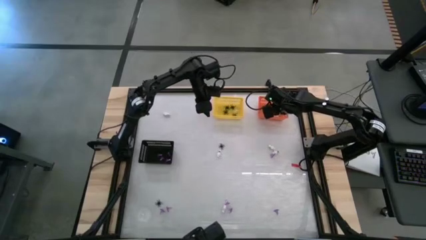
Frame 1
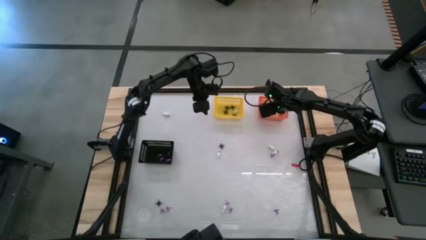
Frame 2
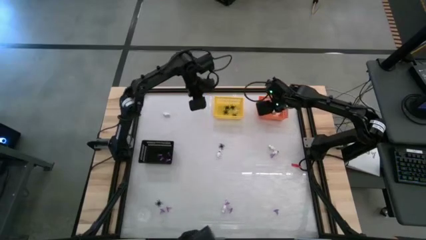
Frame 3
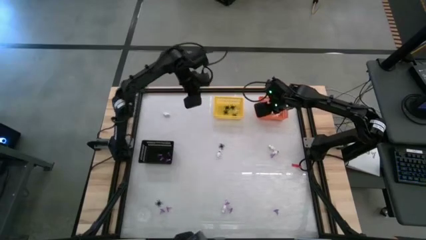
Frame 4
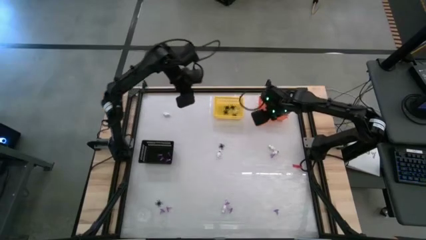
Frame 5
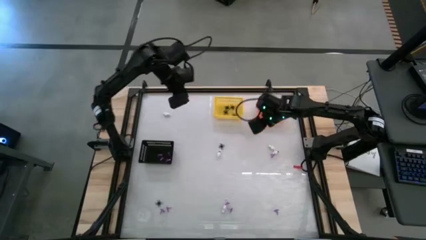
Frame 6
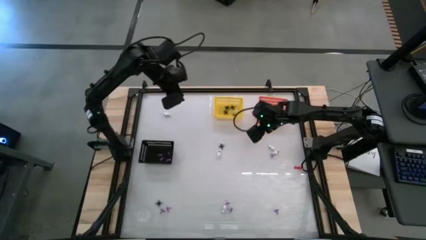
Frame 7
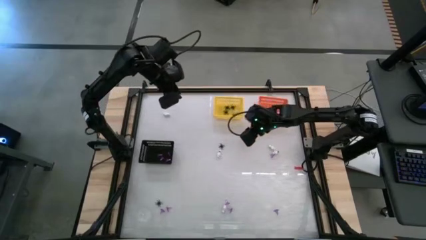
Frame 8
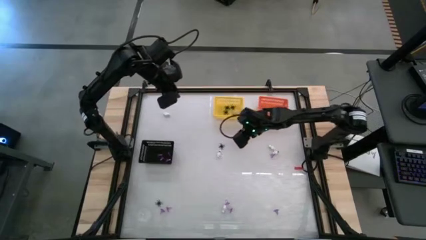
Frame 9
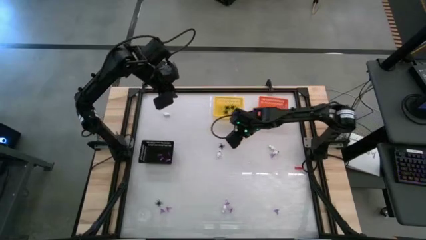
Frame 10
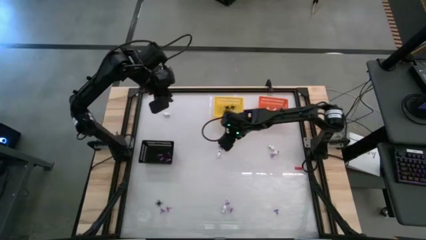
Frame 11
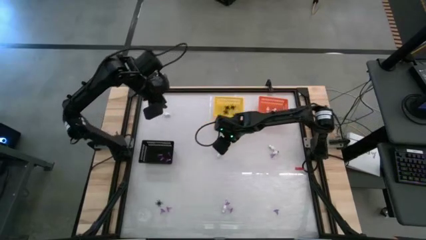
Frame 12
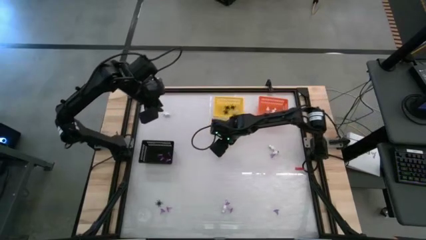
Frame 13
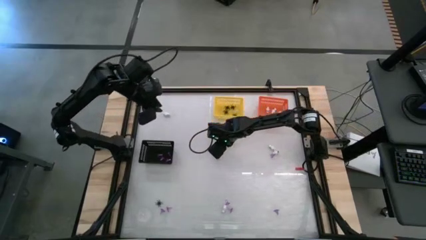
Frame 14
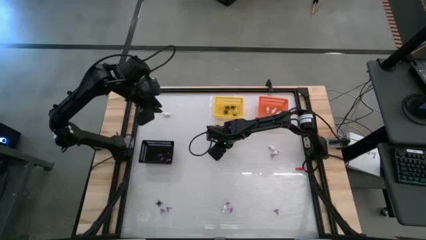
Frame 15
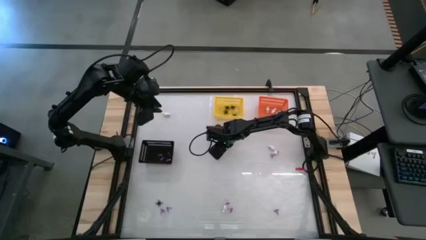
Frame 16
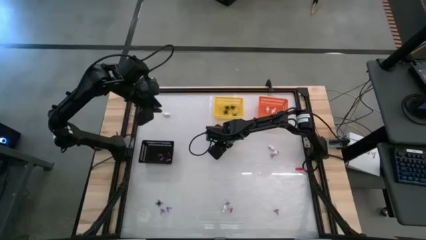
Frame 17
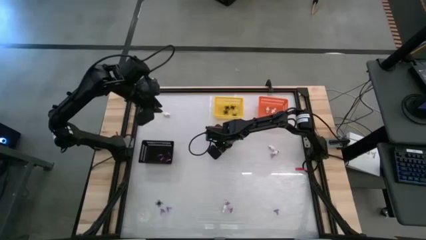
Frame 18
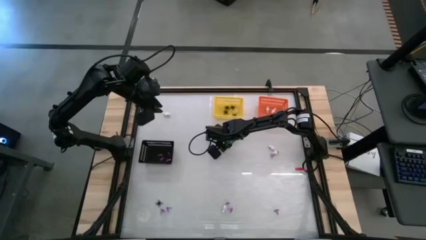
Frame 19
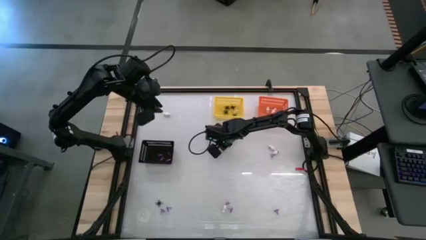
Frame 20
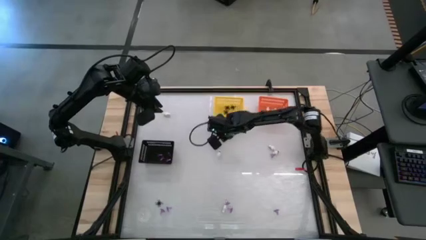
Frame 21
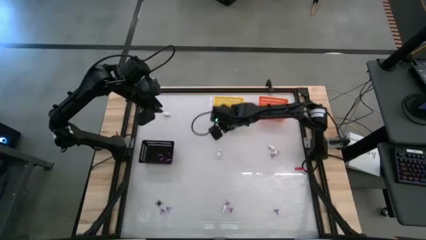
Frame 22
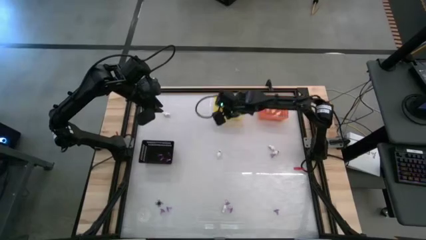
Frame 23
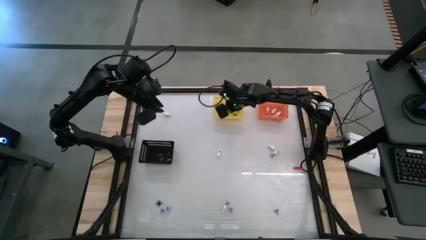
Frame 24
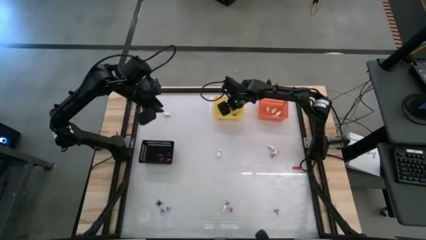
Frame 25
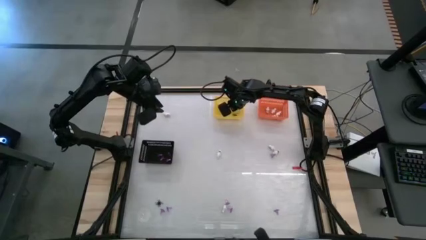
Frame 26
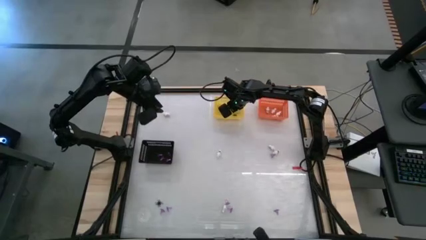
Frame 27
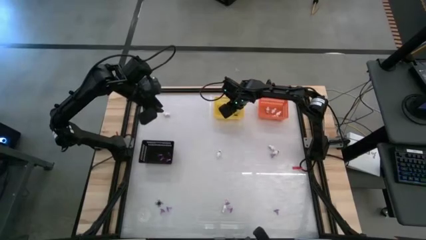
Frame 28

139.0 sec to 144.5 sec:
Task: Sort Halloween decoration
Put the black spider toy into the yellow bin

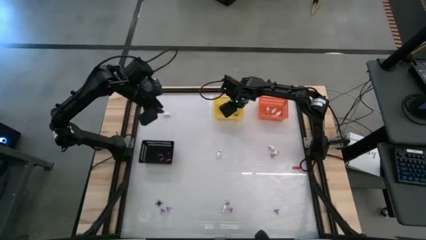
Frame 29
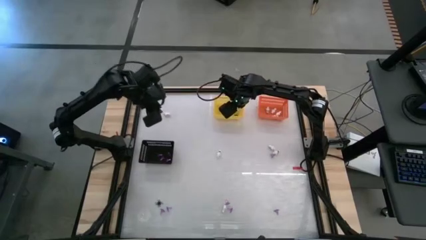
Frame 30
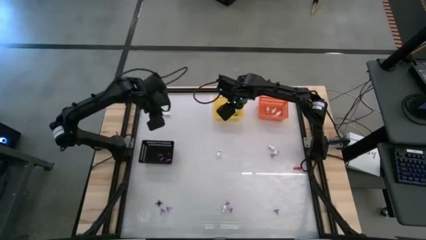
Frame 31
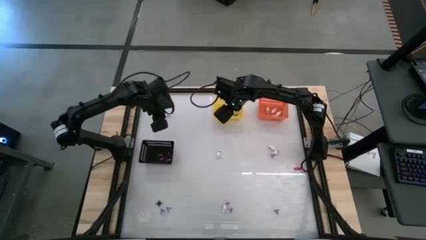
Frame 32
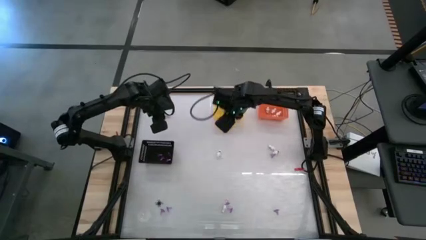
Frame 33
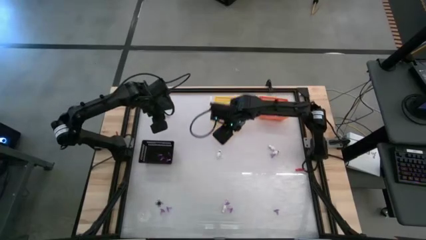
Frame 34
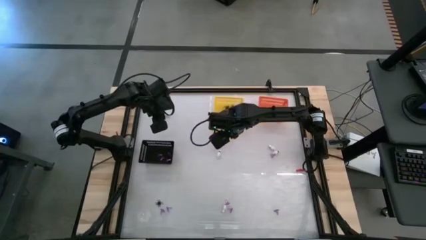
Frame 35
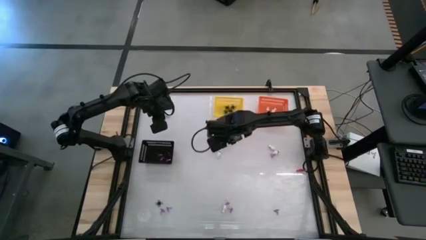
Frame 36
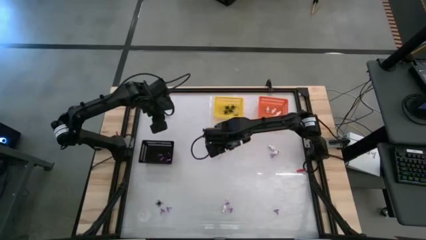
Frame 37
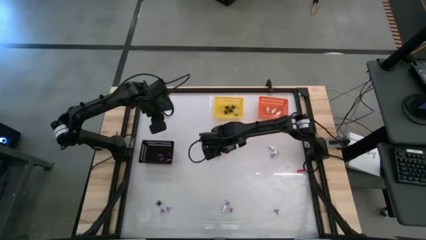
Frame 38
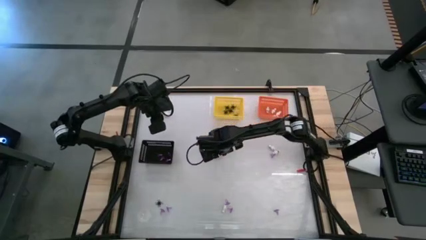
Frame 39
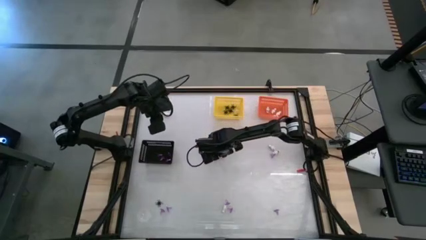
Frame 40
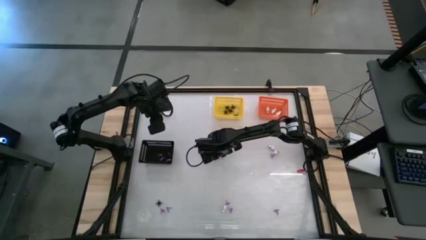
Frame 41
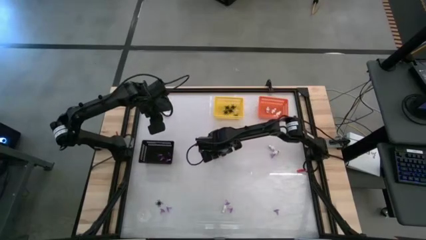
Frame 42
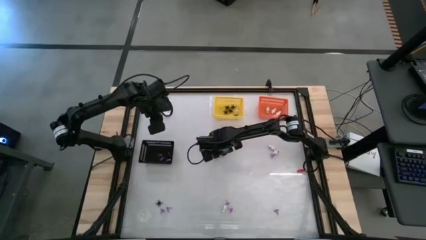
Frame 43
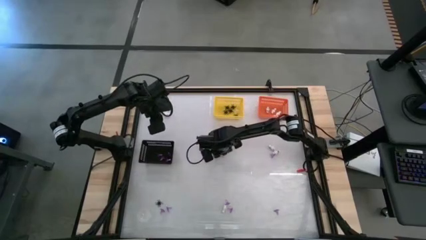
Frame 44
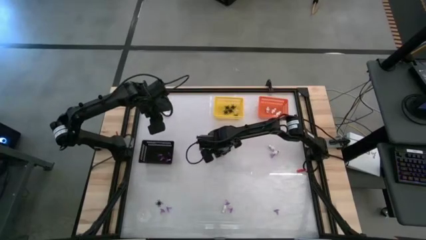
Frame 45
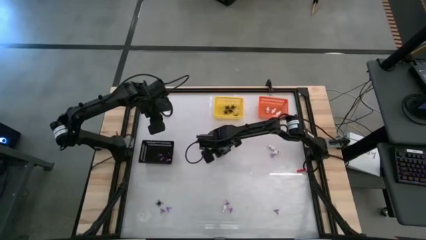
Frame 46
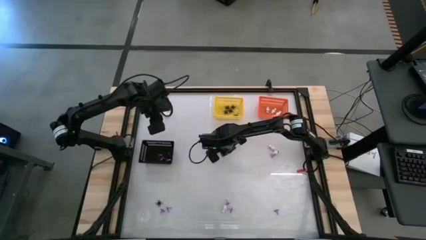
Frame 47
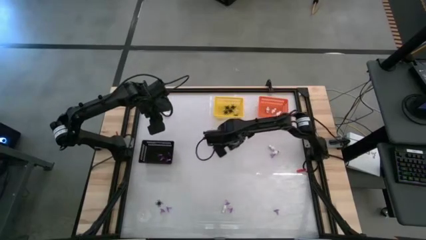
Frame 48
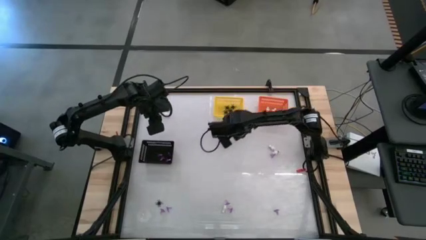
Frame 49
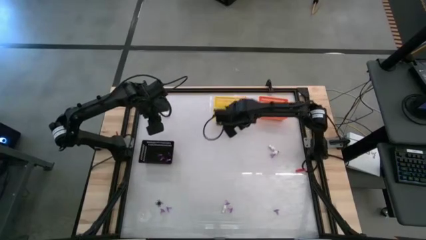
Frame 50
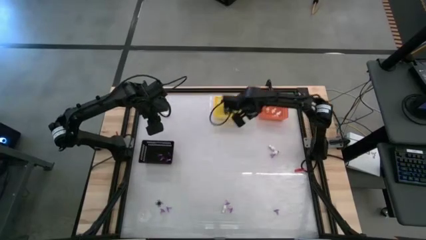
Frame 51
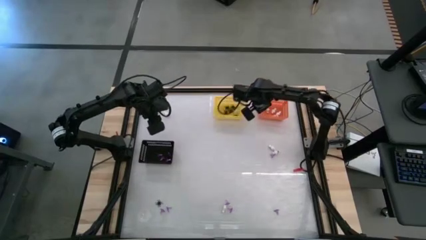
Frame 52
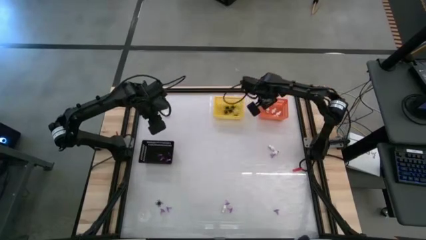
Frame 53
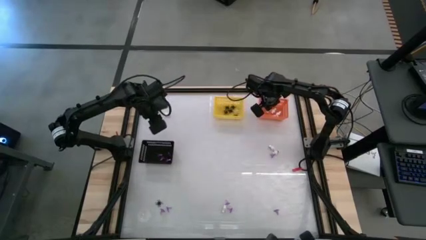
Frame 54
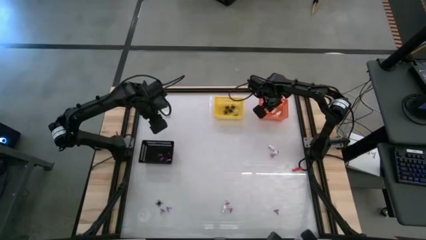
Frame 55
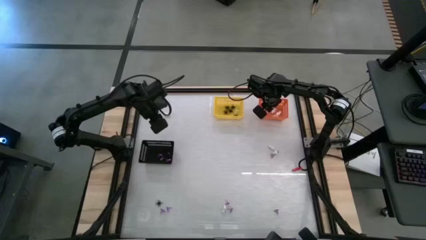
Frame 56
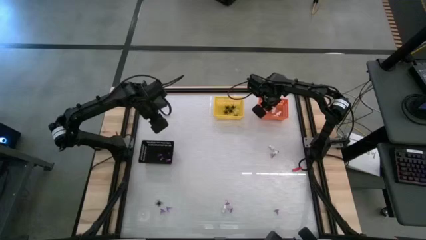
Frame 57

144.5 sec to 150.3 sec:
Put the white skeleton toy into the orange bin

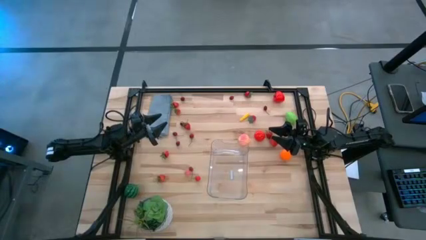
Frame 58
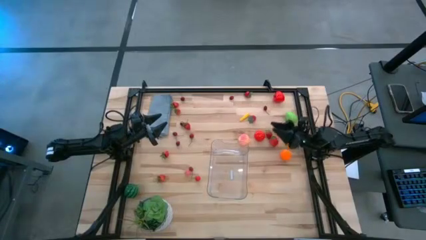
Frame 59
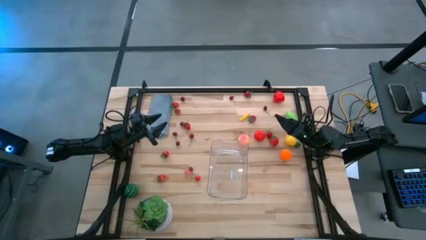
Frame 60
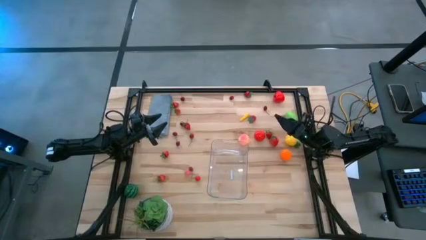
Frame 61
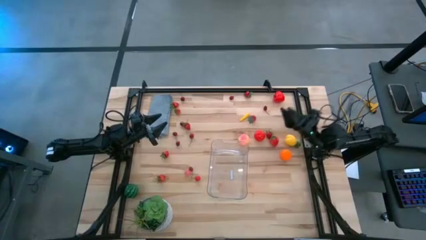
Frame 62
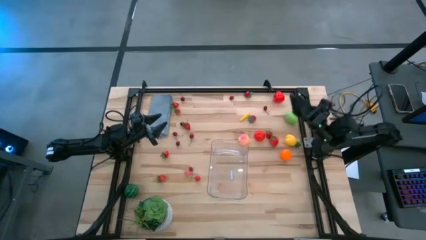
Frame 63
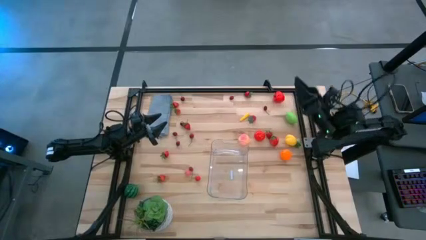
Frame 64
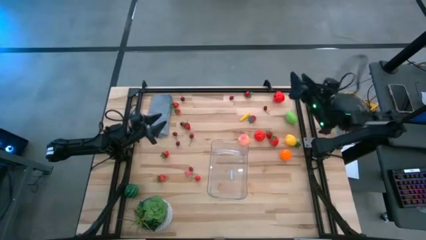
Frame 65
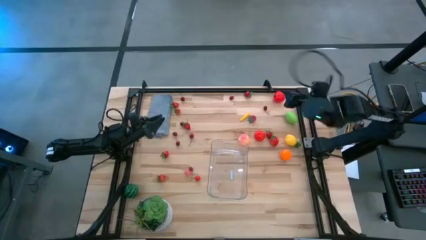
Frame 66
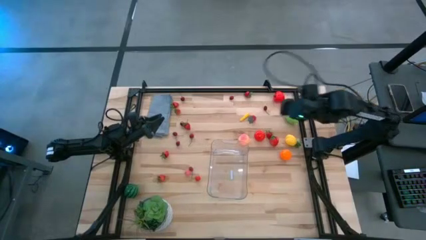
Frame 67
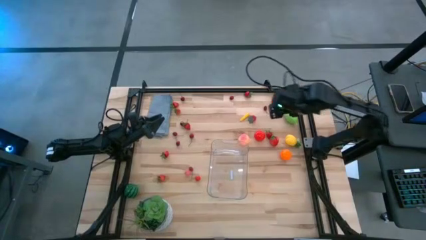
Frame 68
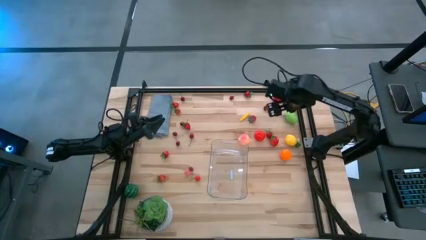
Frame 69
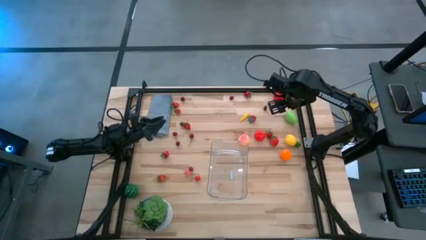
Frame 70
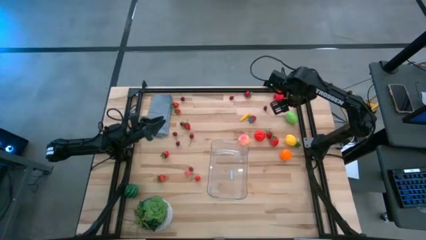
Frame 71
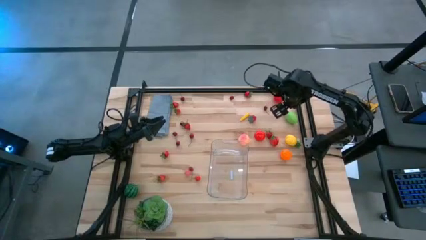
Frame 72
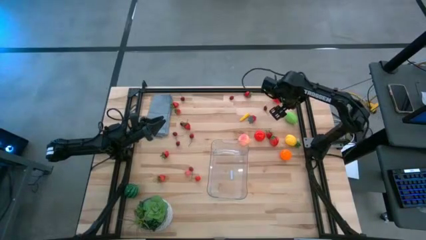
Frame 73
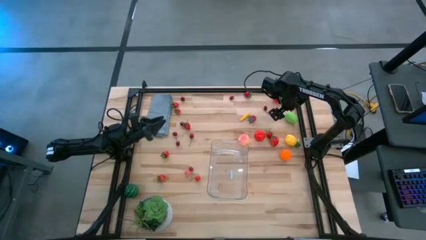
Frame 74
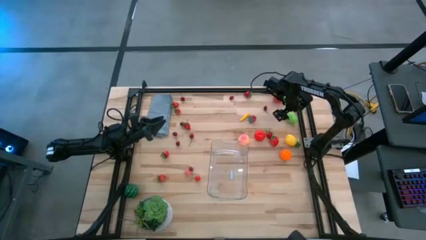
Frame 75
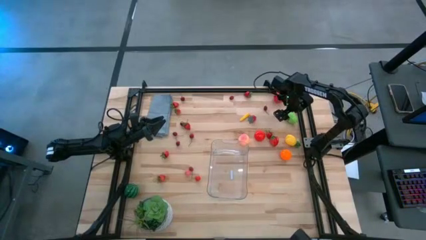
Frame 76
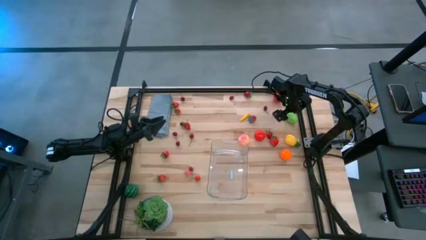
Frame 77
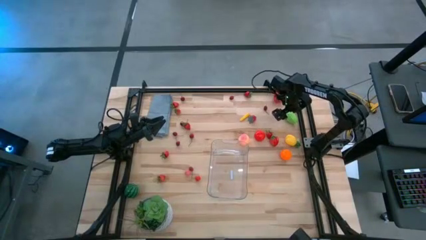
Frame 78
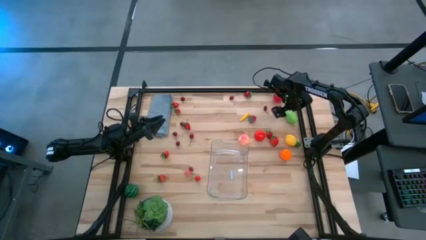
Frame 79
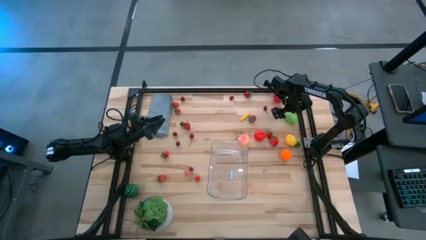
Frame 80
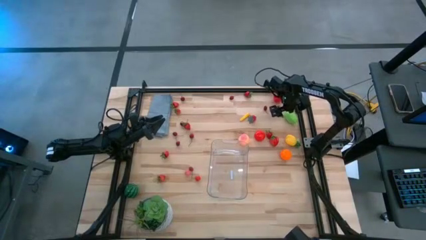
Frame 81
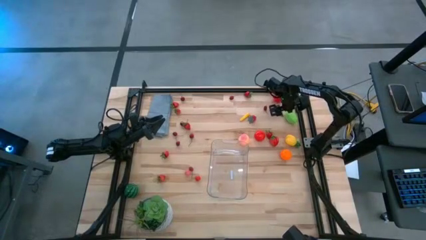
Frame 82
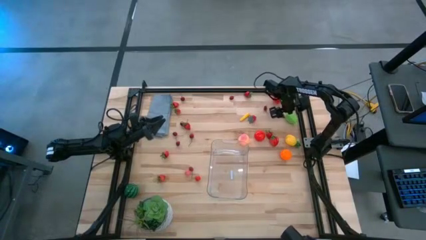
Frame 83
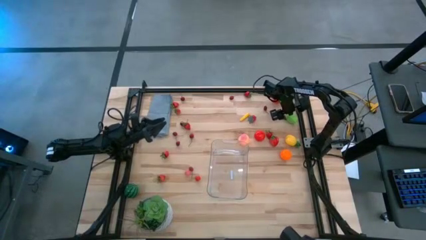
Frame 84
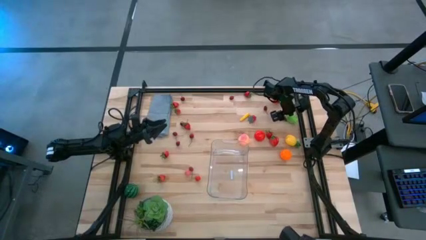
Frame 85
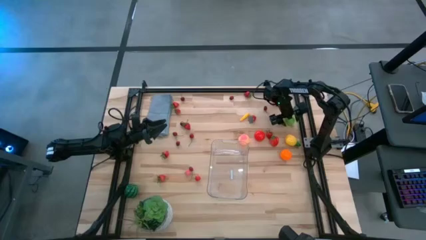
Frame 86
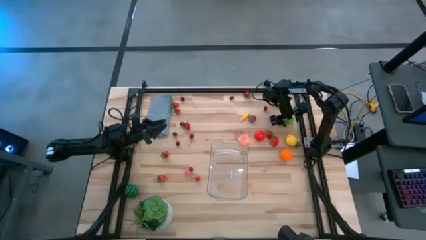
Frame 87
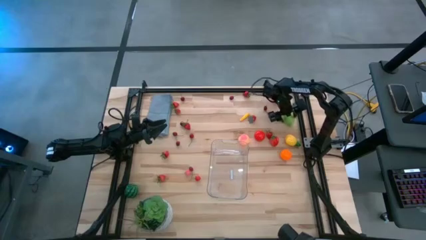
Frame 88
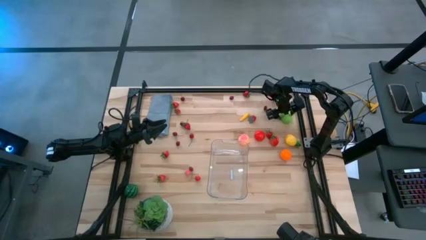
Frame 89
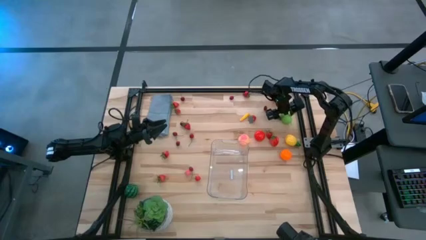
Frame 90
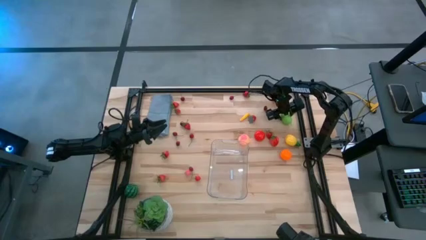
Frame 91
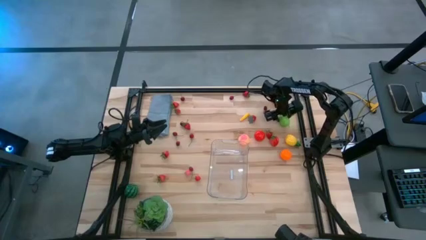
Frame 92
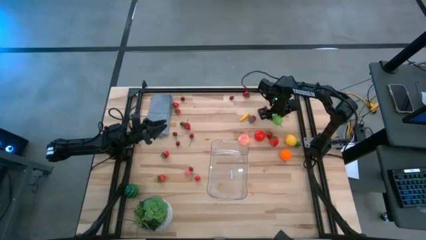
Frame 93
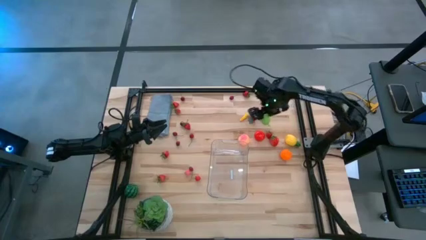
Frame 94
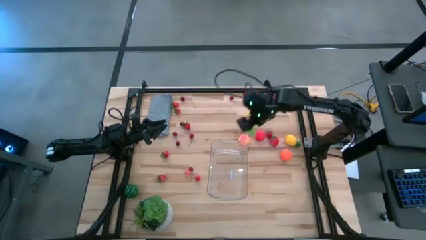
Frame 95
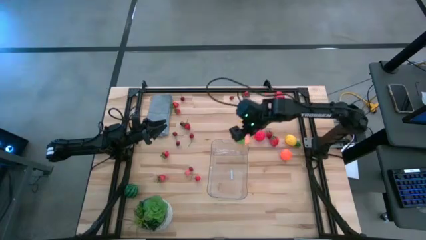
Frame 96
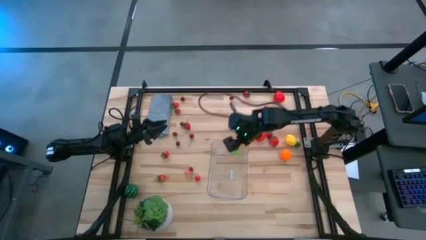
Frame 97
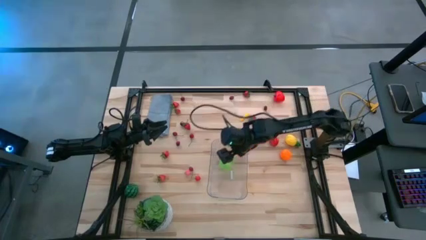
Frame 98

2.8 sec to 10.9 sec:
Task: Pick and placing Produce into tupperware
Put the cabbage into the transparent bin
